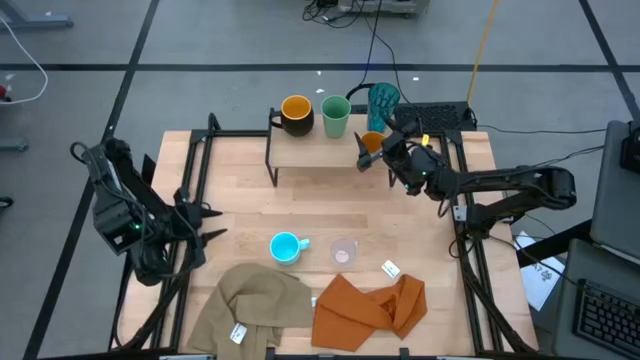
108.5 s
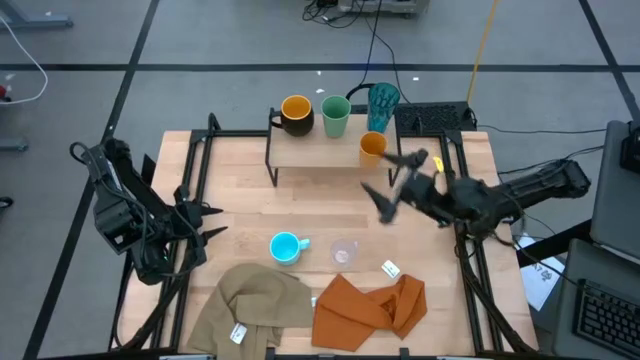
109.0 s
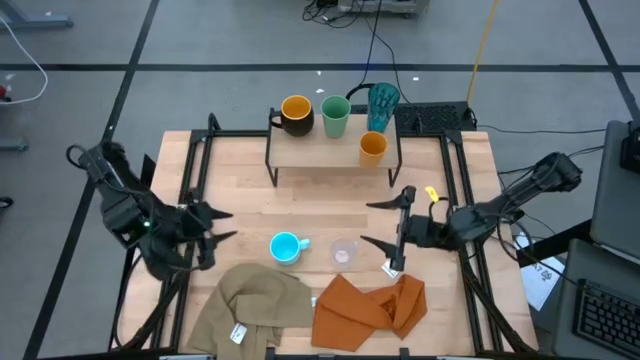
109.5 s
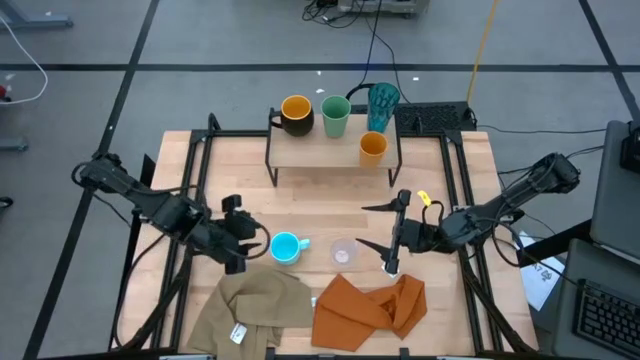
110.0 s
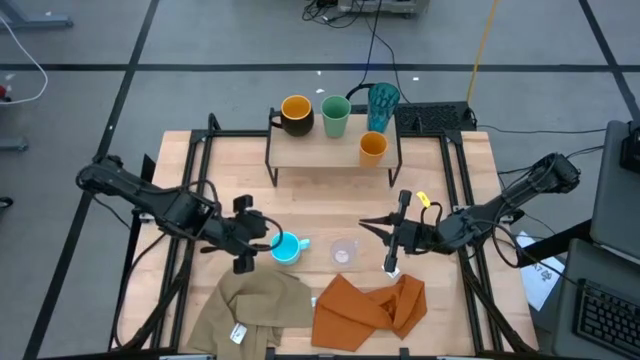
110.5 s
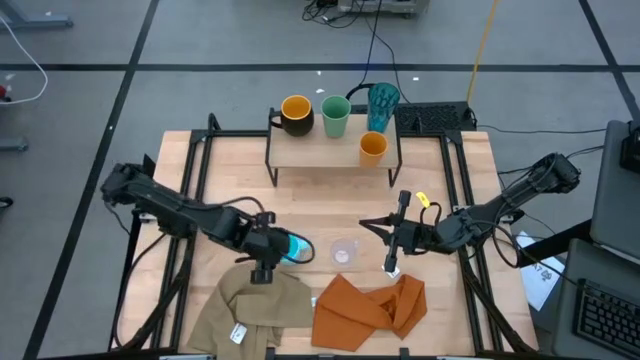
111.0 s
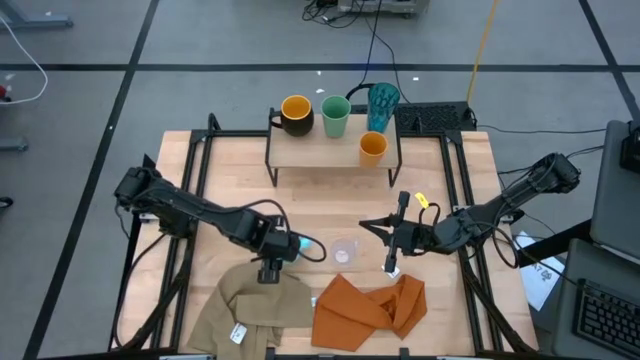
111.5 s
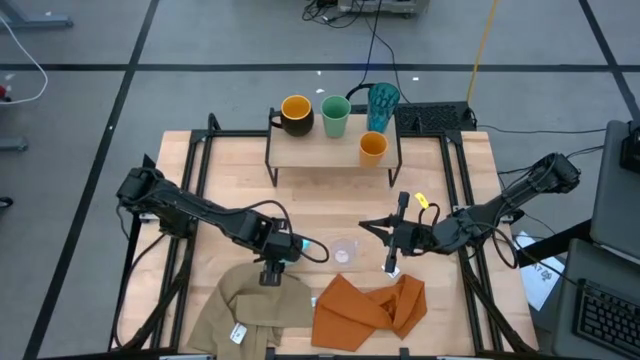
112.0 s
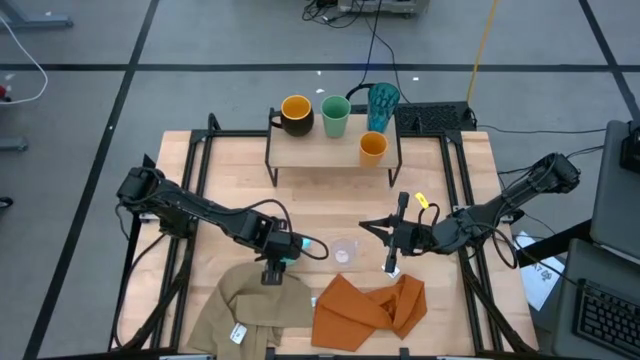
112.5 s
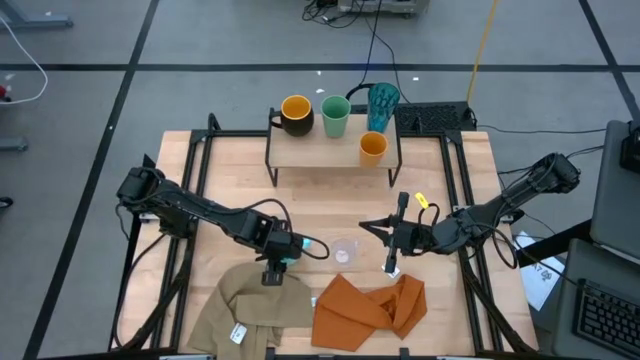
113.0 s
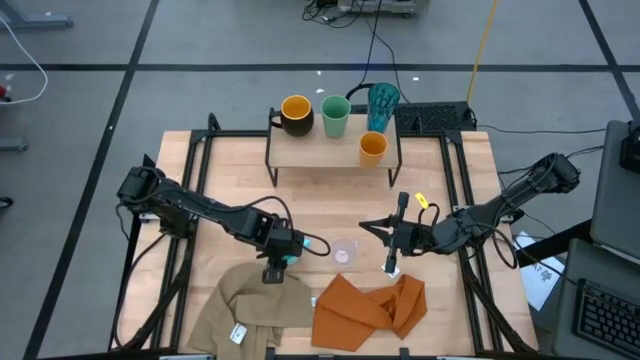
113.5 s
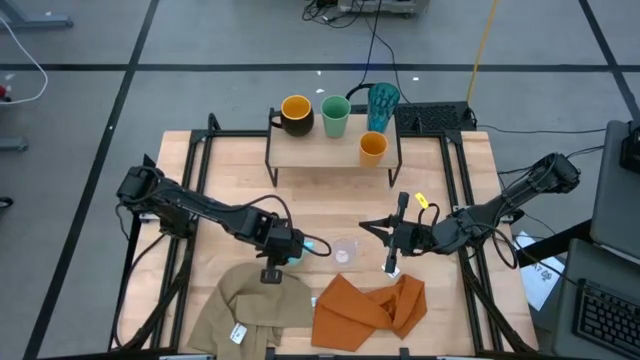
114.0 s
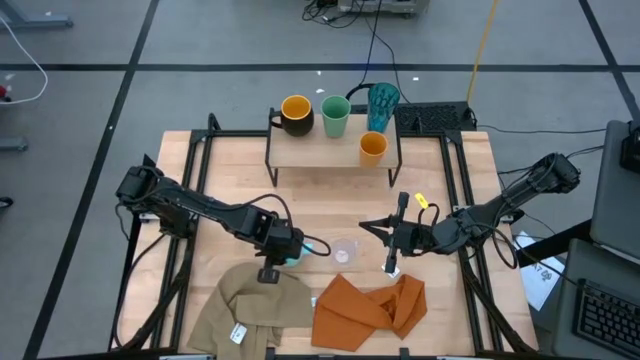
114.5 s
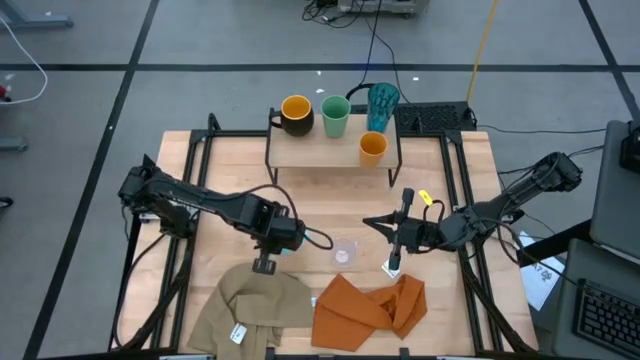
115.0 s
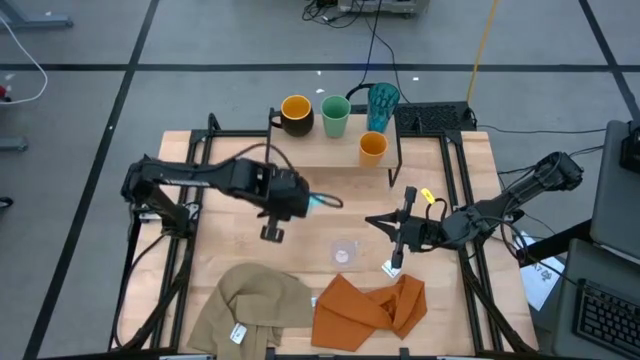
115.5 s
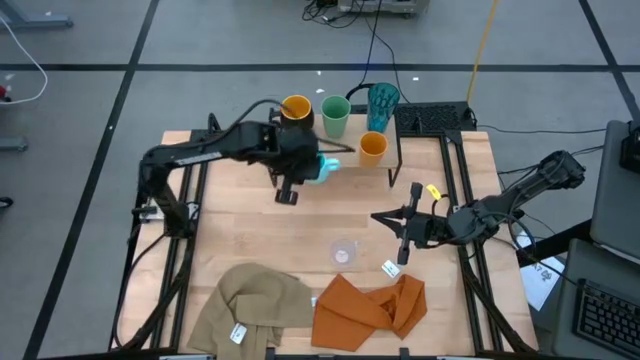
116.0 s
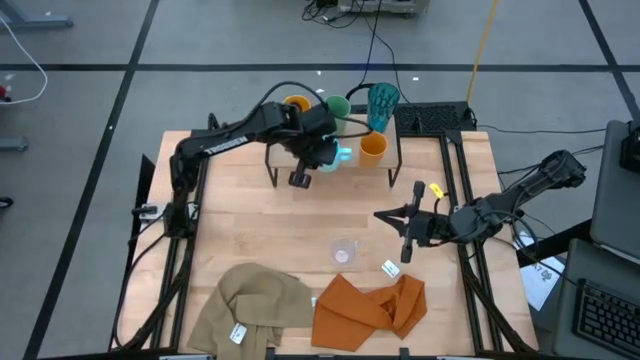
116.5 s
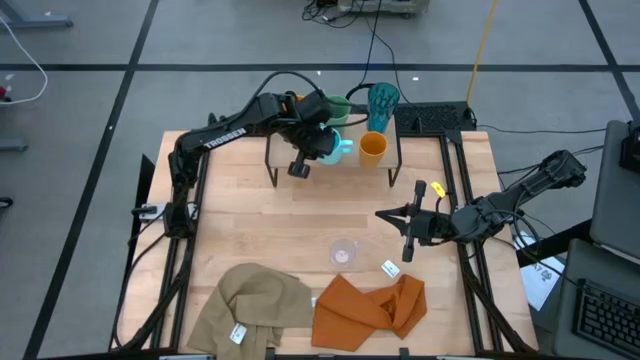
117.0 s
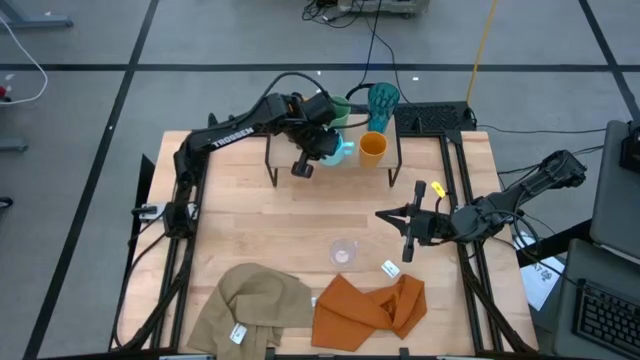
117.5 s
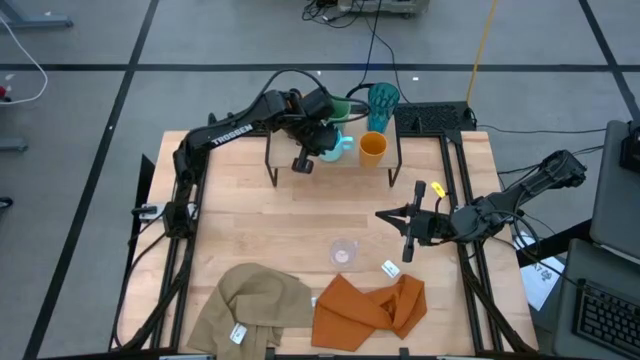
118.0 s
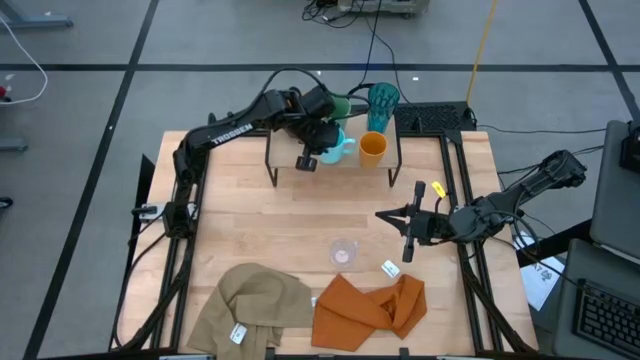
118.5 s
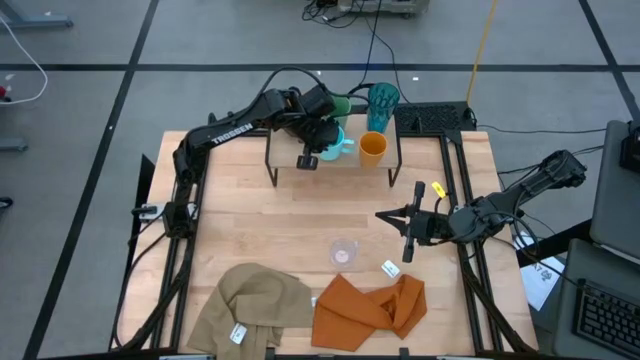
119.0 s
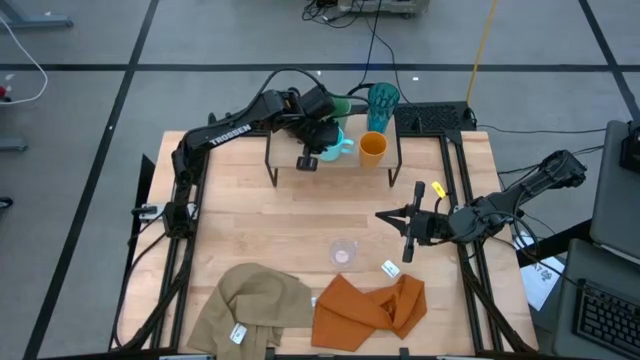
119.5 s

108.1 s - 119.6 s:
Task: Stack small to large cups/mugs on shelf
Put the light blue mug on the shelf

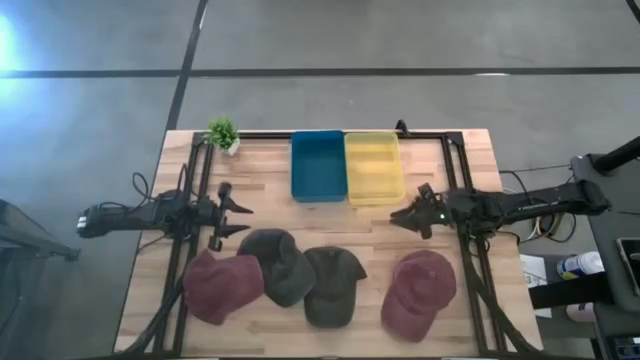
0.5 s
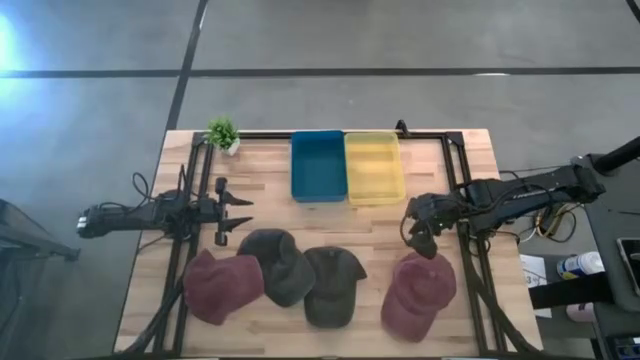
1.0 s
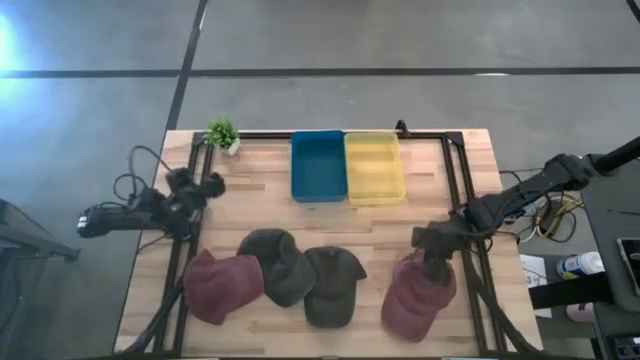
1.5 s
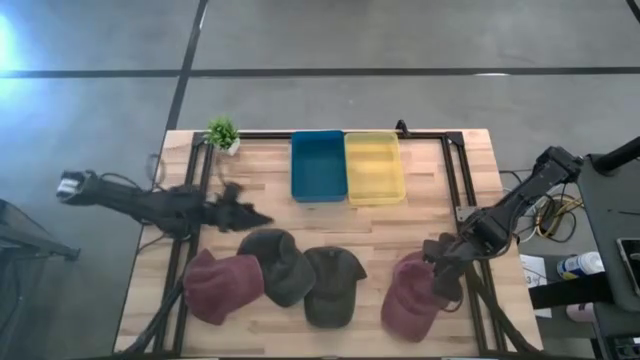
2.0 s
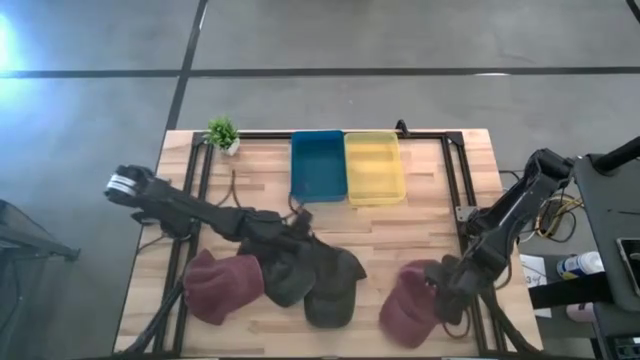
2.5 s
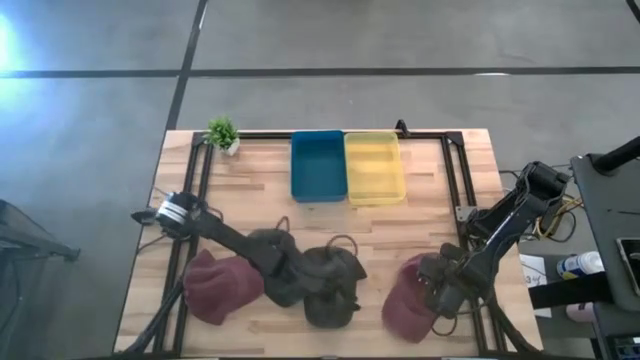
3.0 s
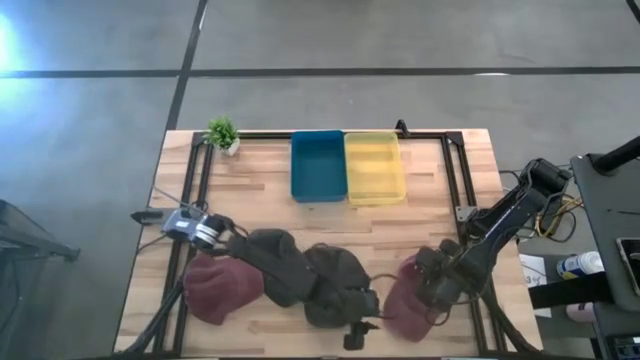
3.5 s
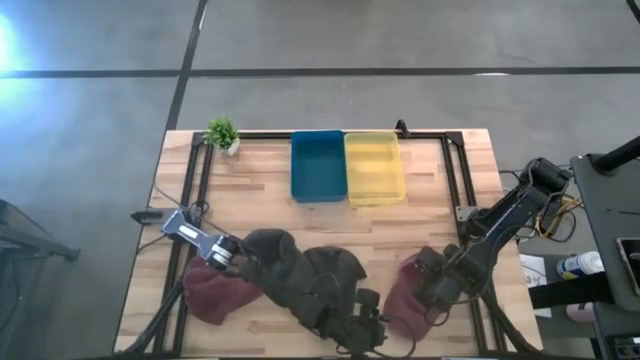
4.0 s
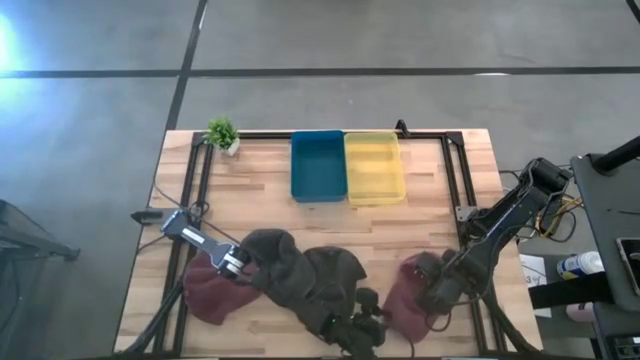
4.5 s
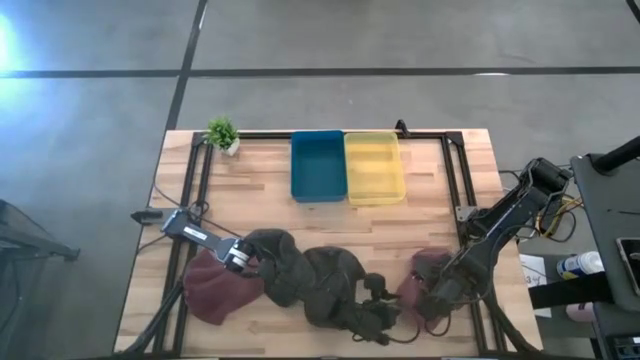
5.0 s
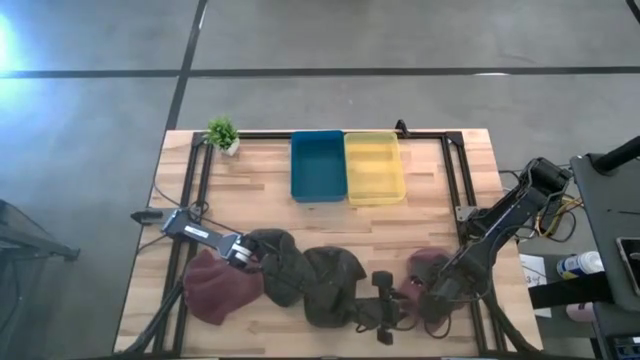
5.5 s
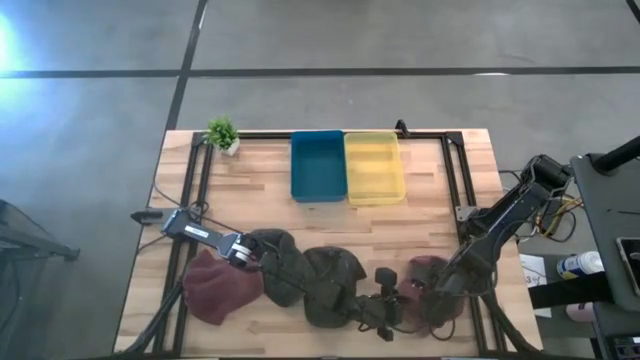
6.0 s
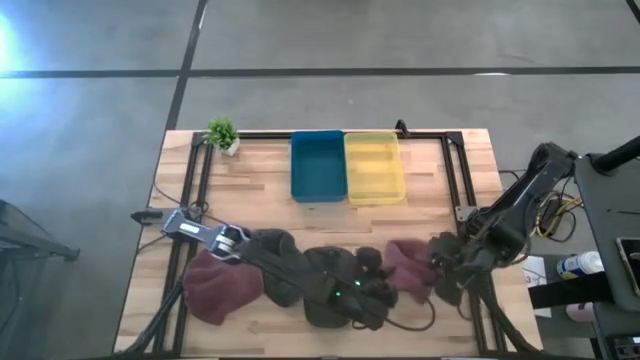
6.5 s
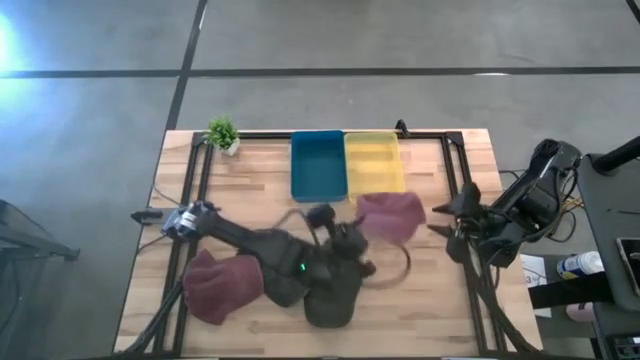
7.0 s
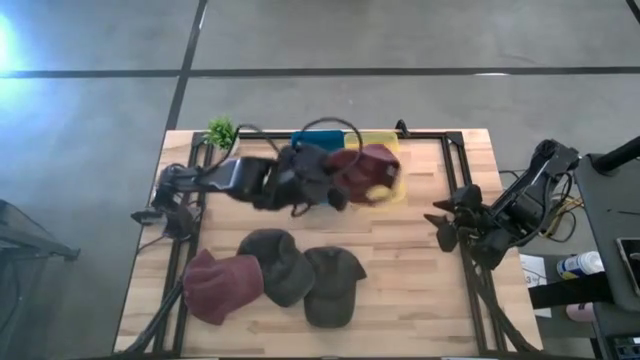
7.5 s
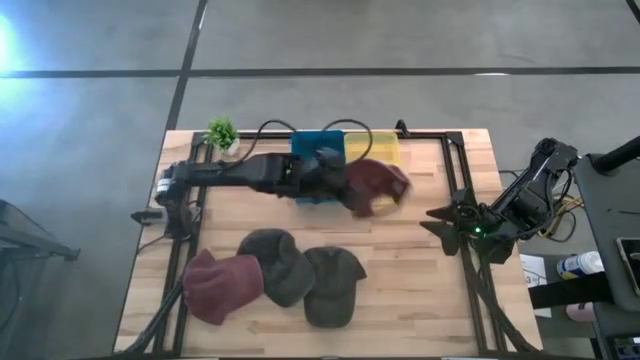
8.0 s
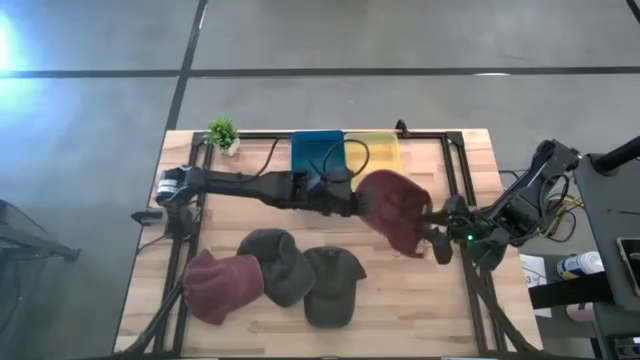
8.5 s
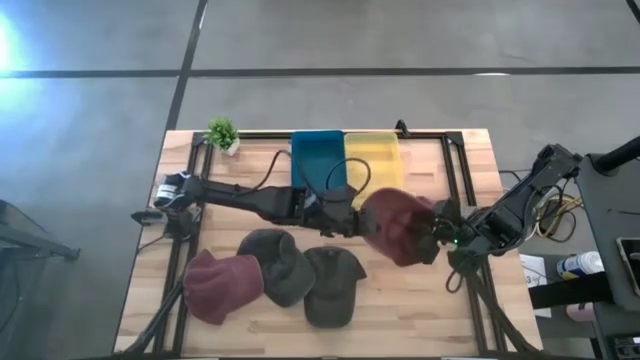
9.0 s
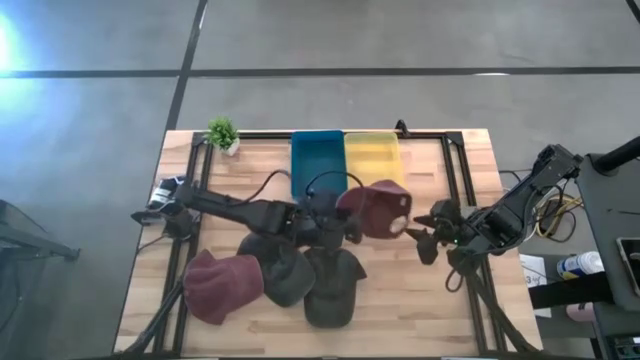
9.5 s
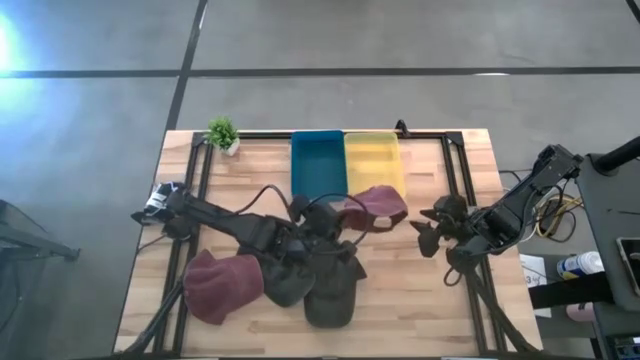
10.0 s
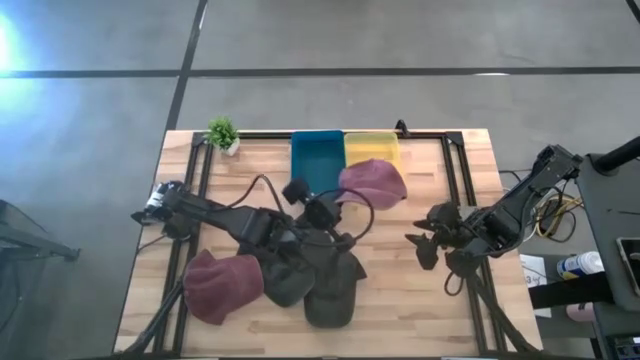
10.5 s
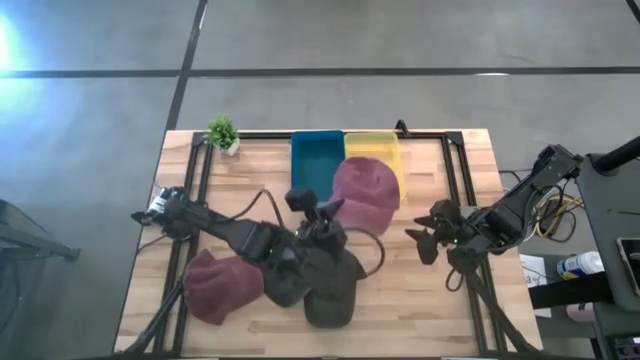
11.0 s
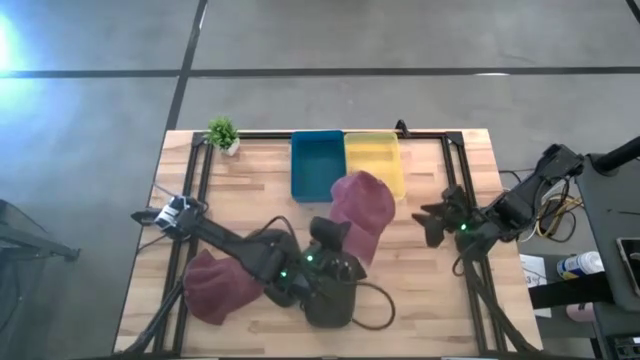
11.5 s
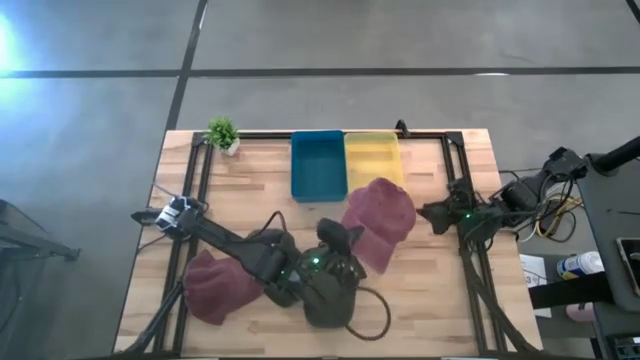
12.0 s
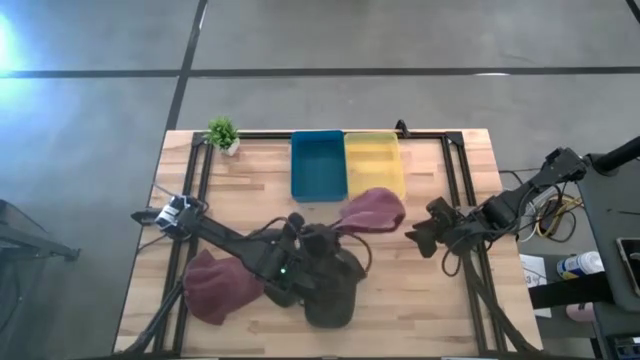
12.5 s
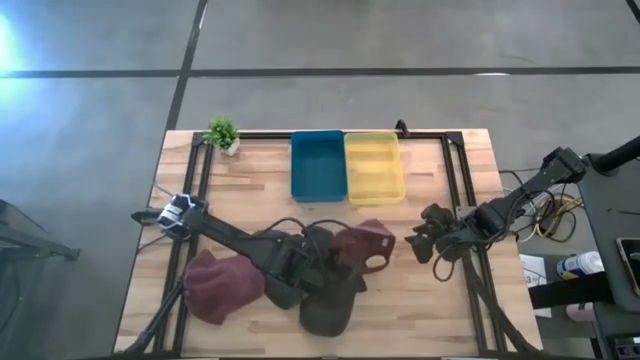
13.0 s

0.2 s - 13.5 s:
Task: Pick & Place hat
Put the right red cap into the yellow bin
